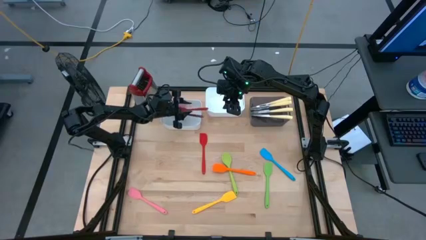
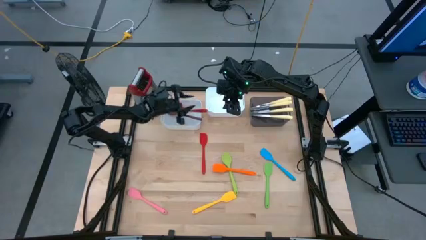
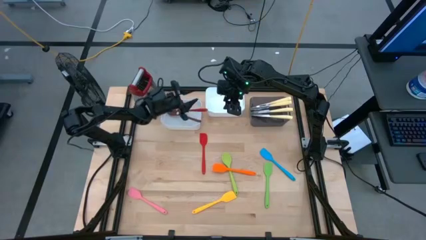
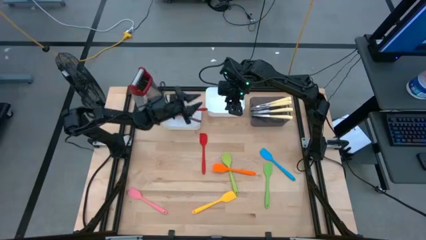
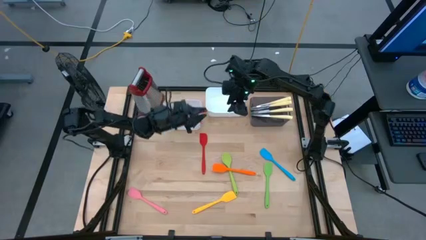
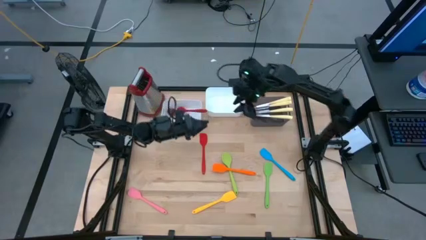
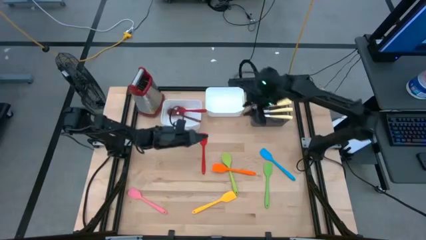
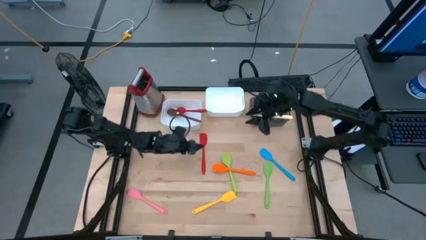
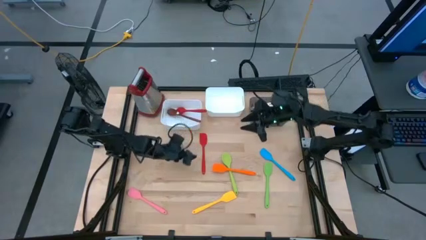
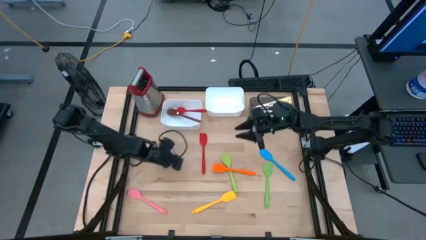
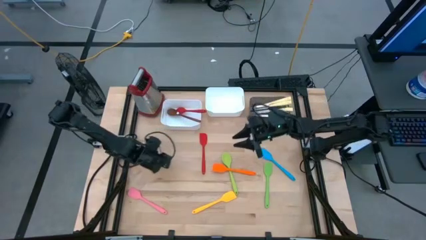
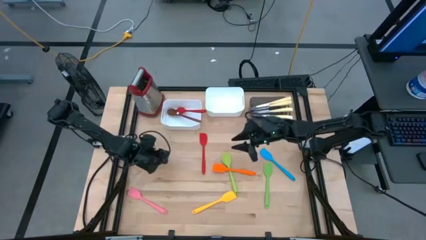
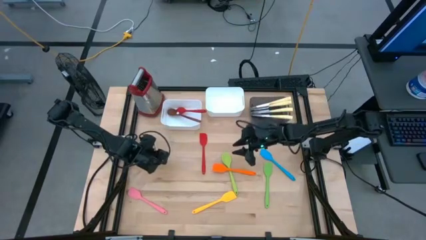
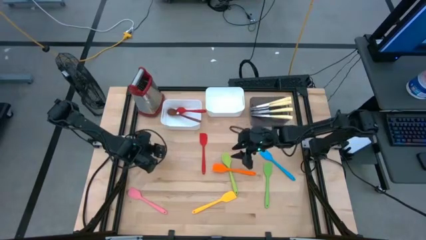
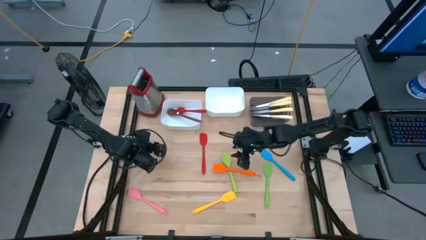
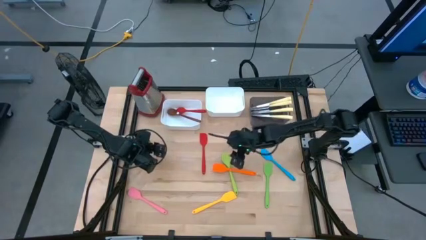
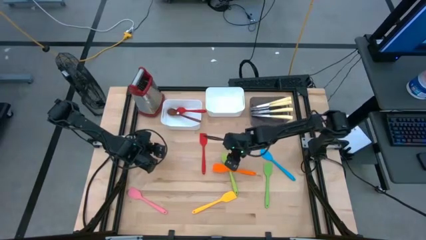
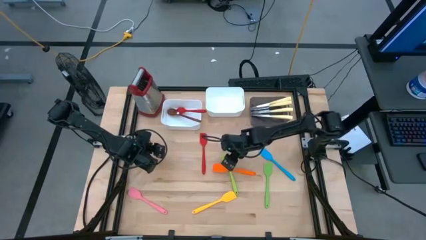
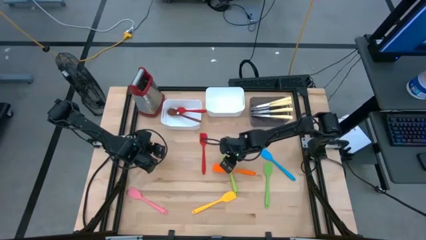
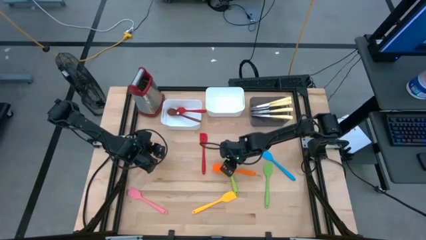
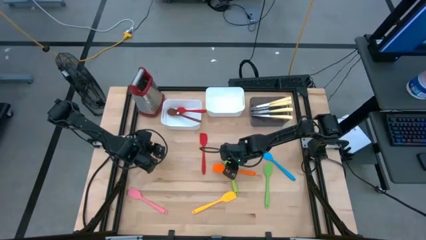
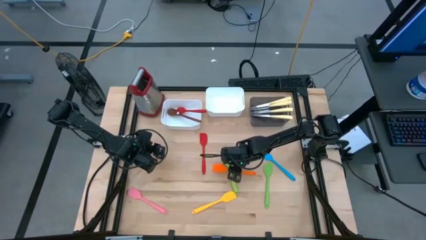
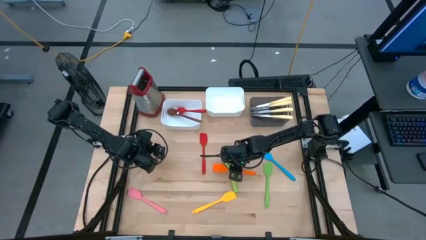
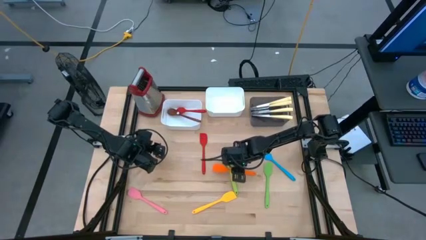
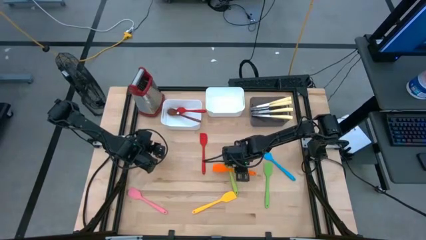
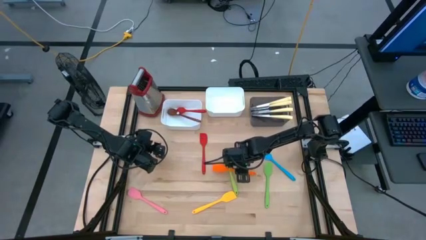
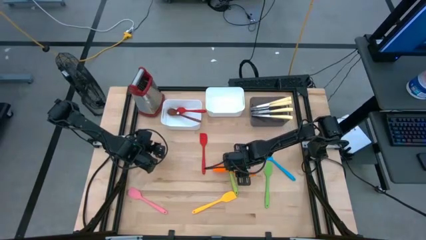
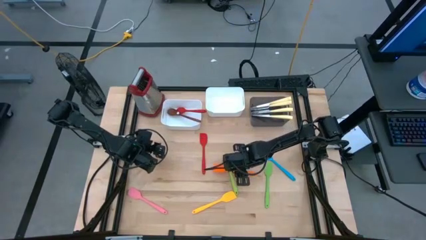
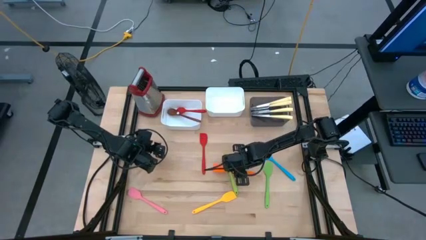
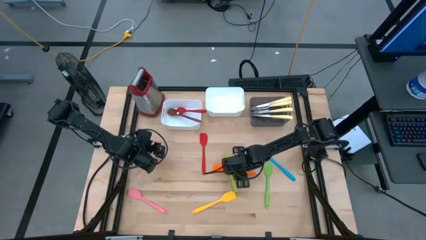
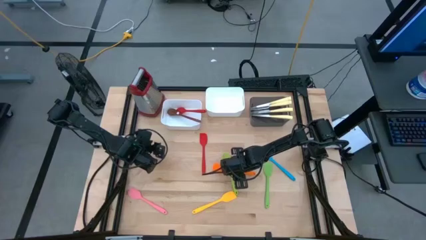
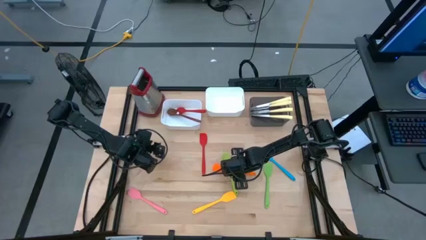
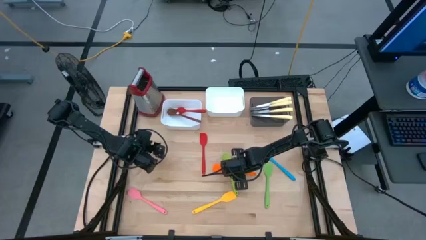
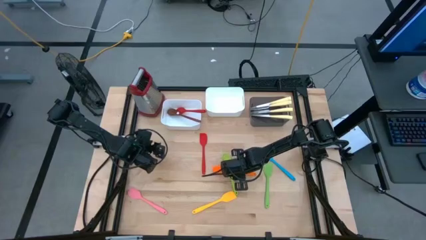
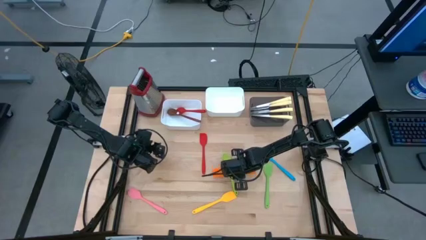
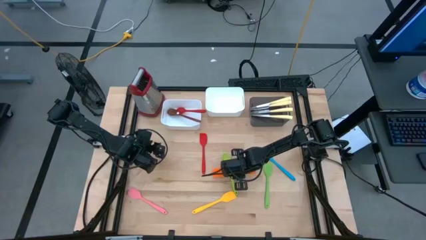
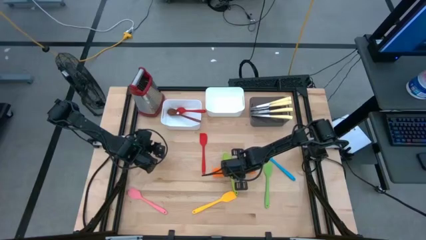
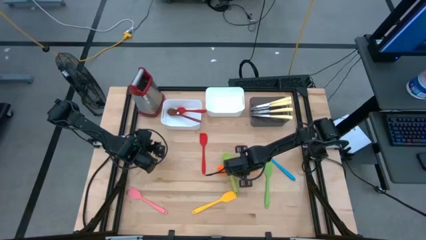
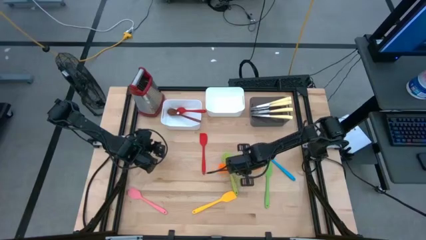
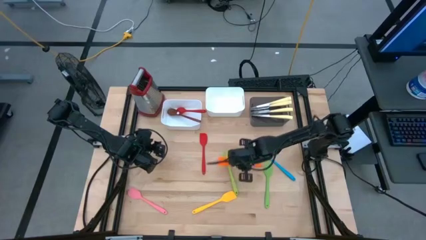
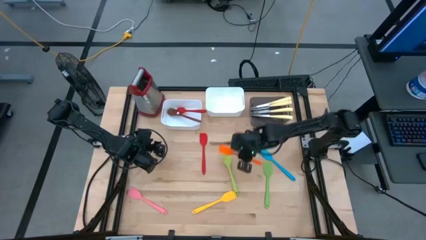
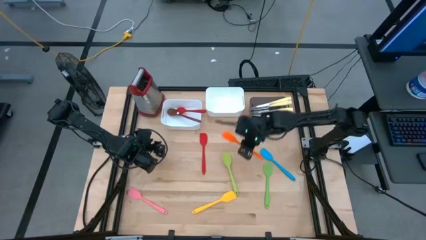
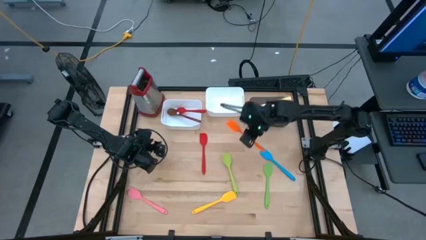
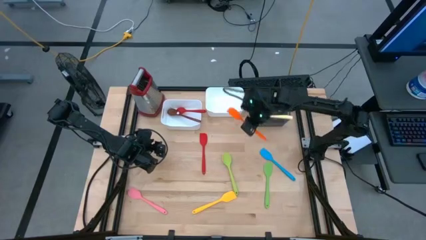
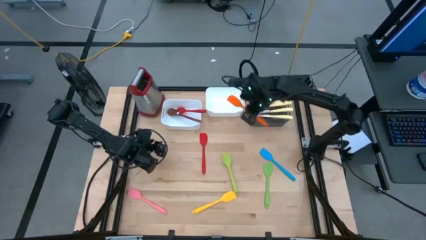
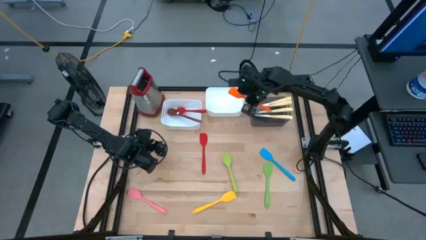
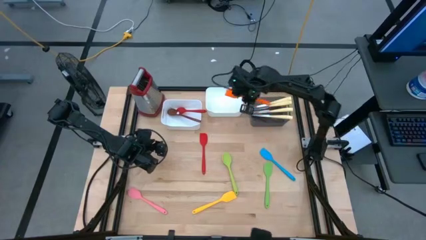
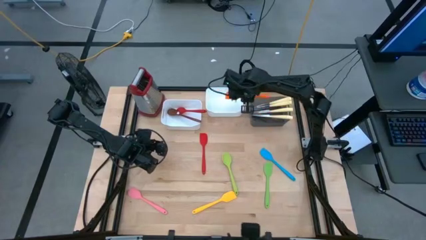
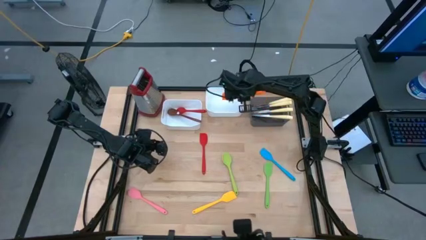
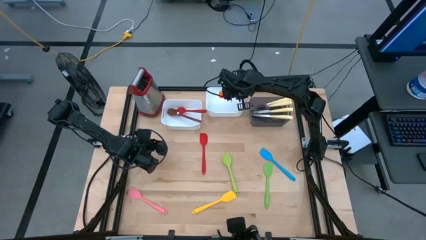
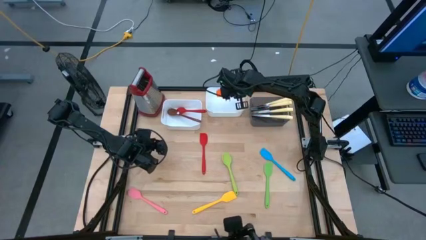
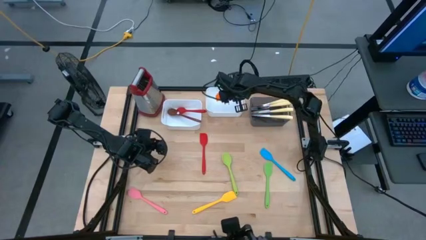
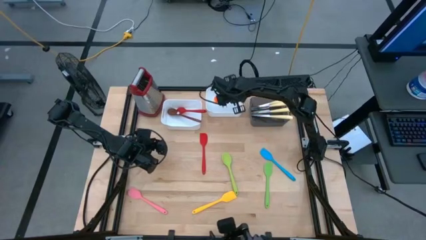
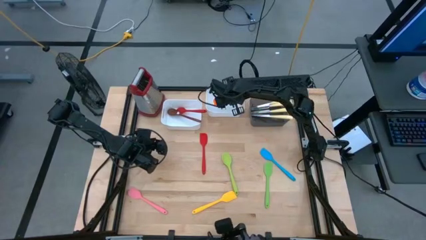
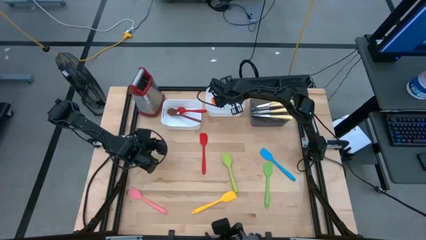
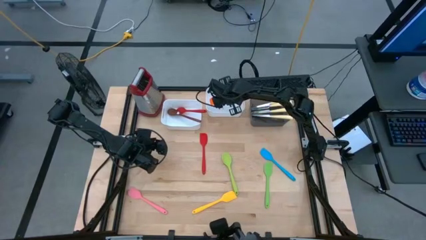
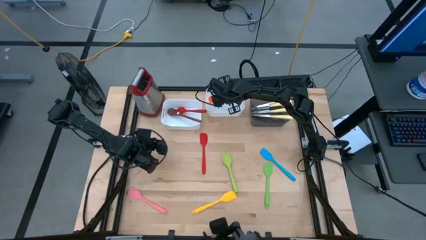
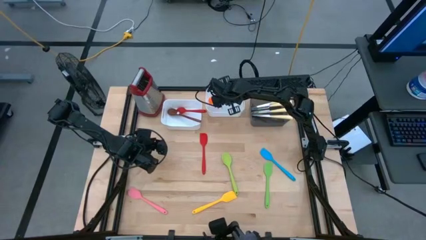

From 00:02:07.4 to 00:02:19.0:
Task: Pick & Place Kitchen Items
Put the orange spatula into the right white bin
